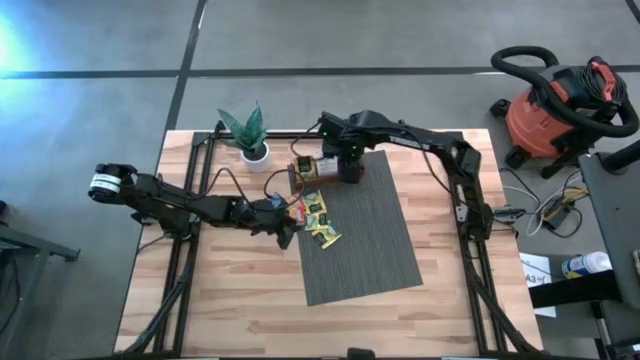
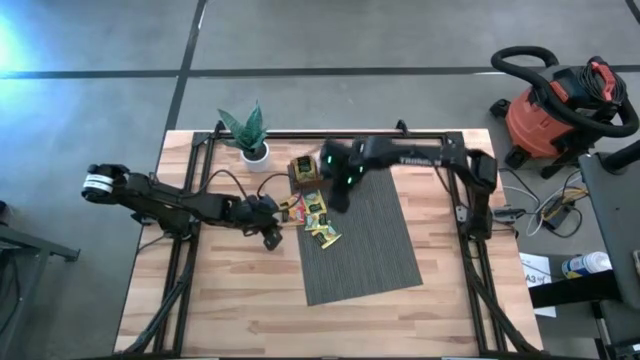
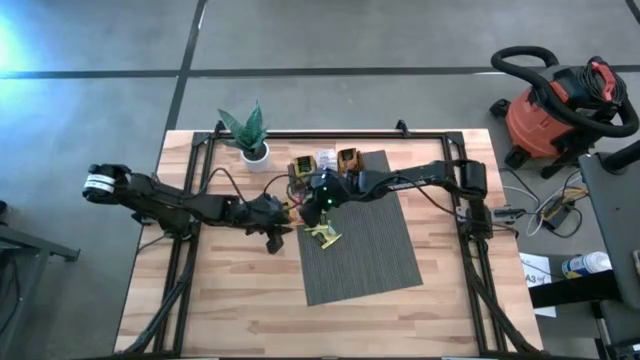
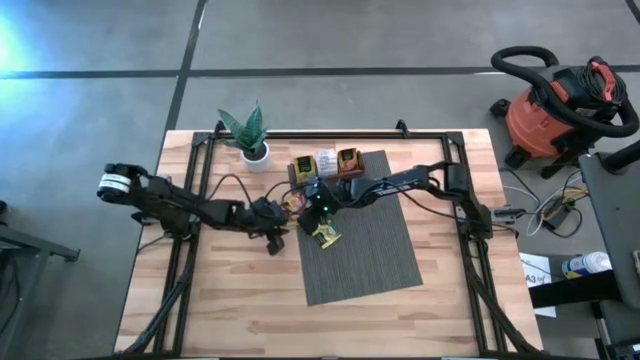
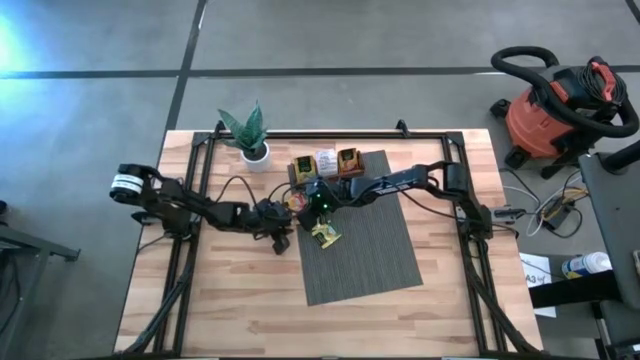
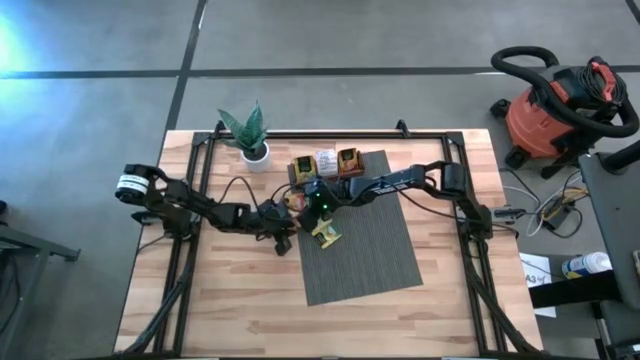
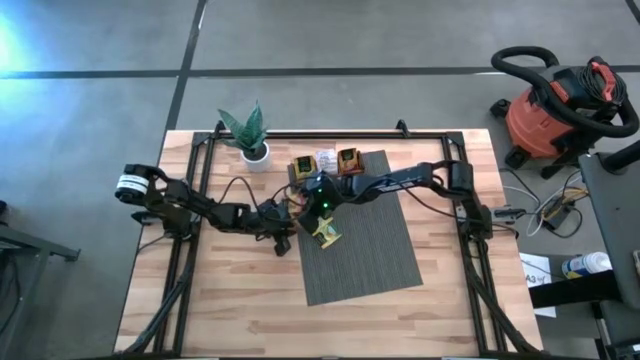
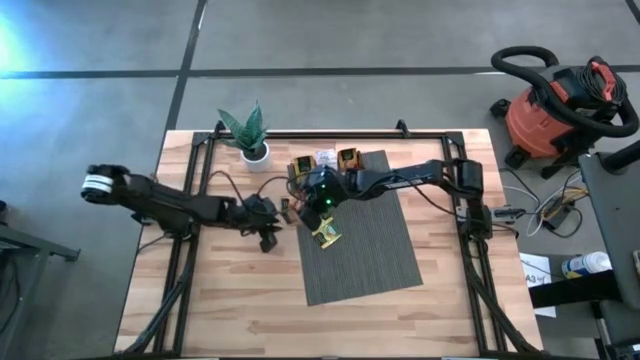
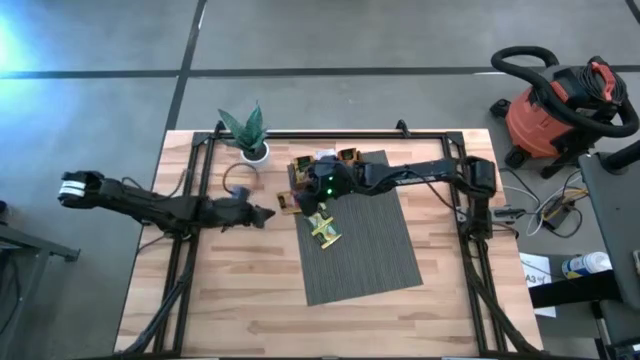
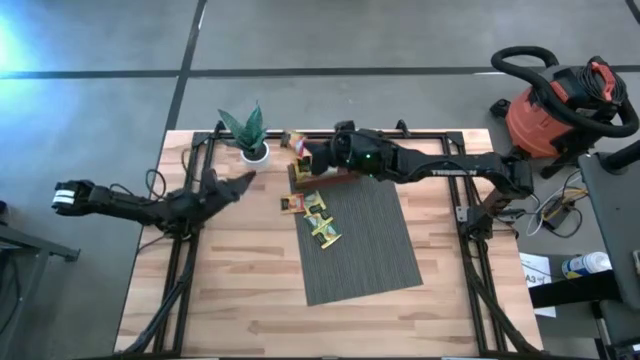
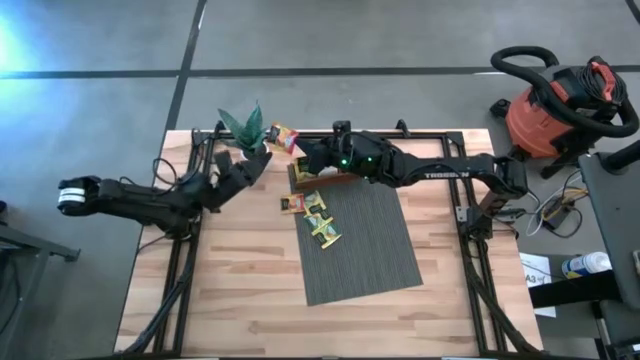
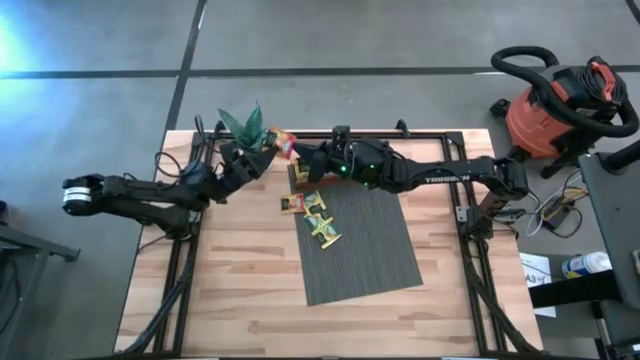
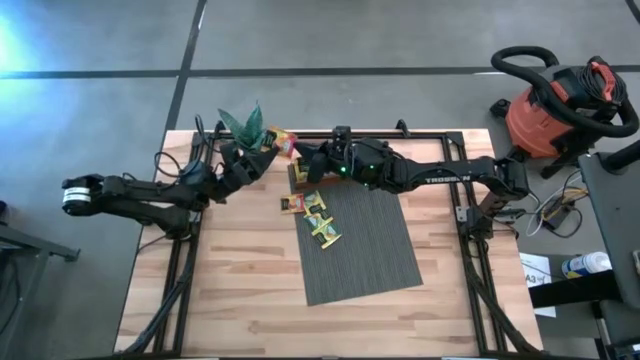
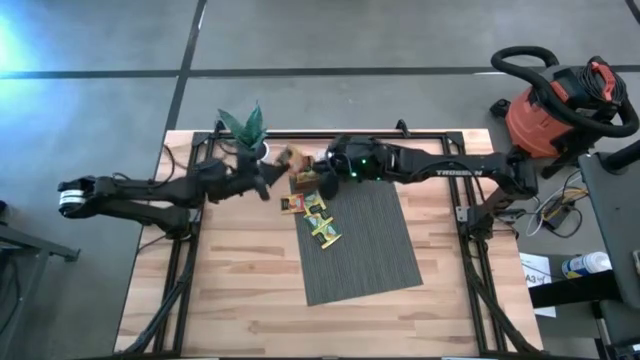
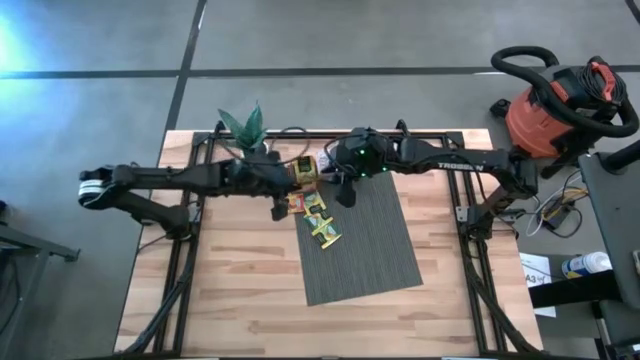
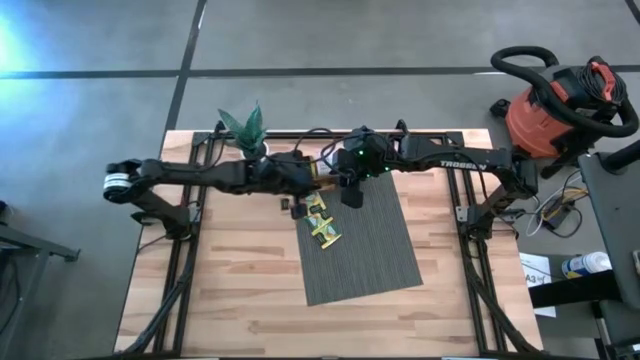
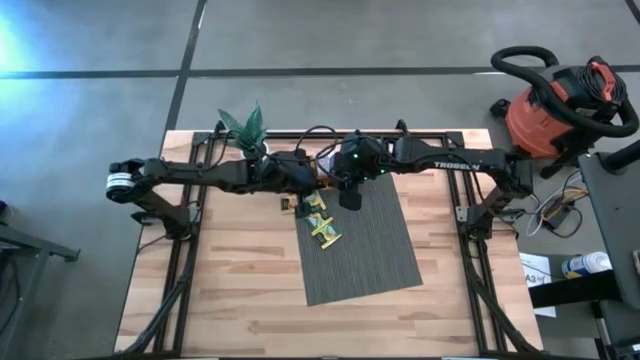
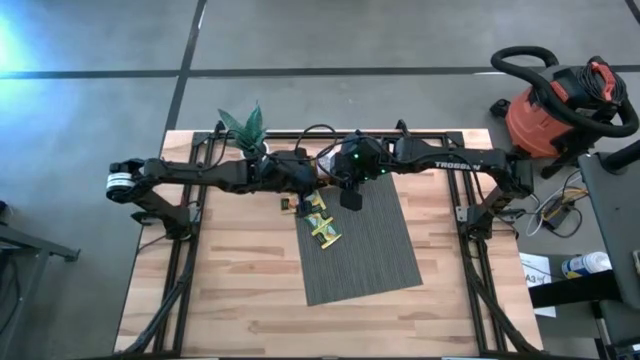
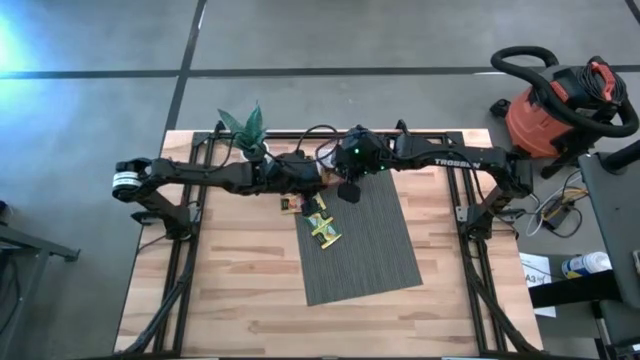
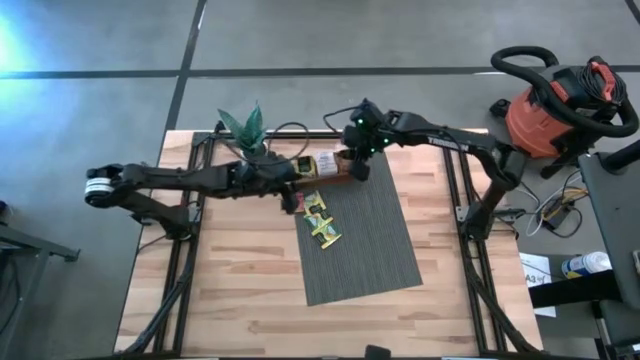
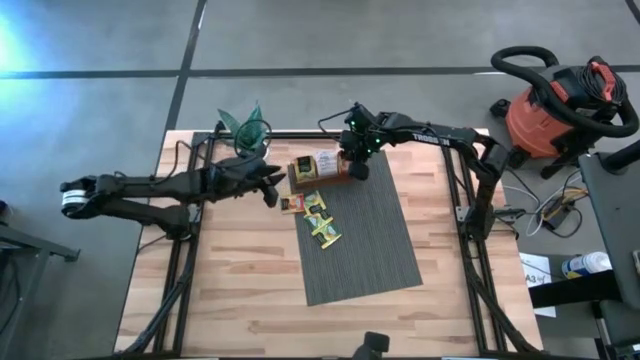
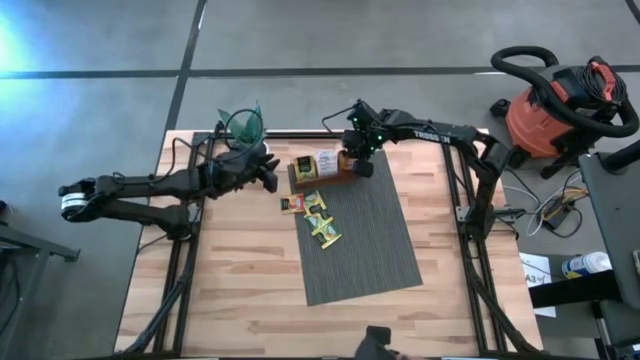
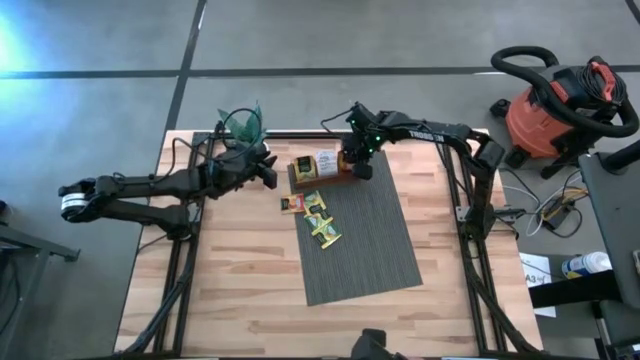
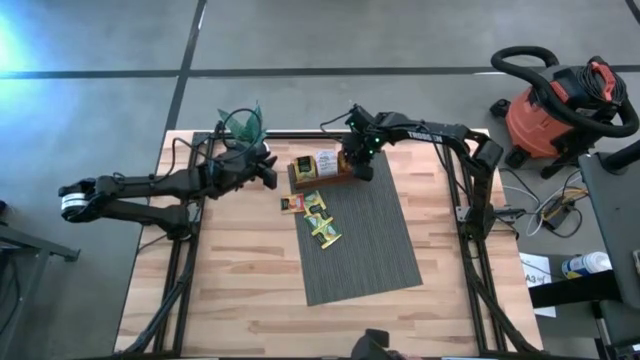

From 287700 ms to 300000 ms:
Task: Pick & Place Tea
Put the bottom orange tea bag into the right compartment of the wooden organizer

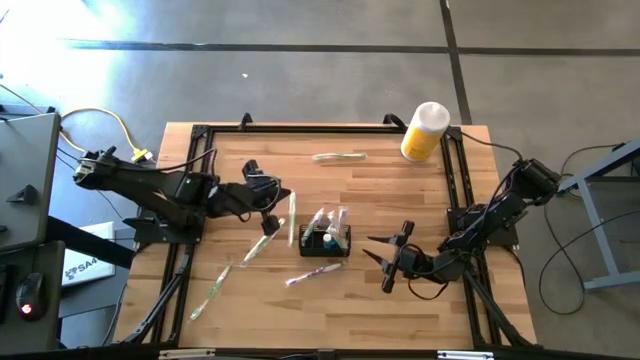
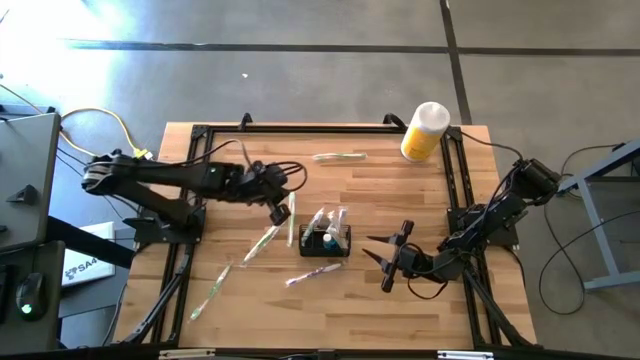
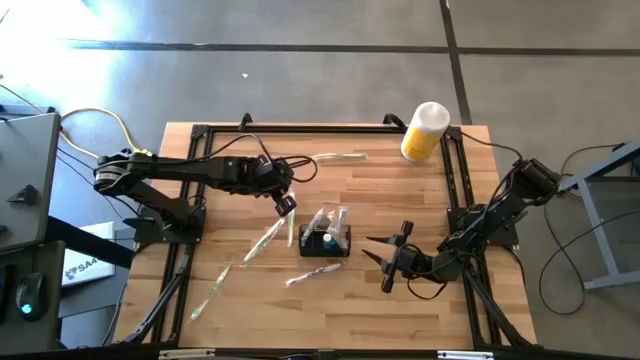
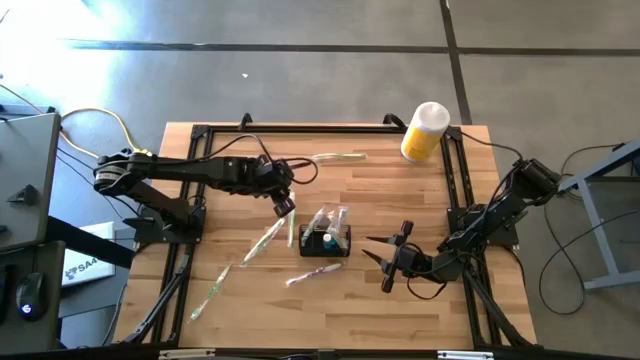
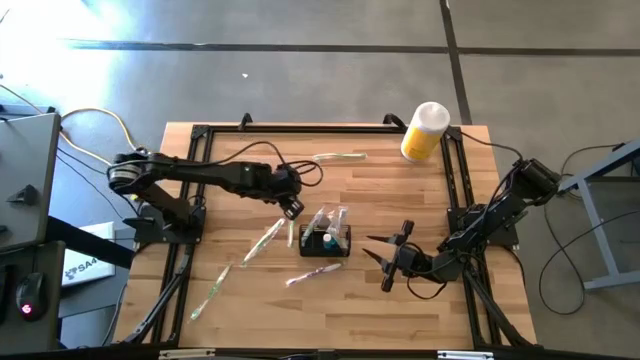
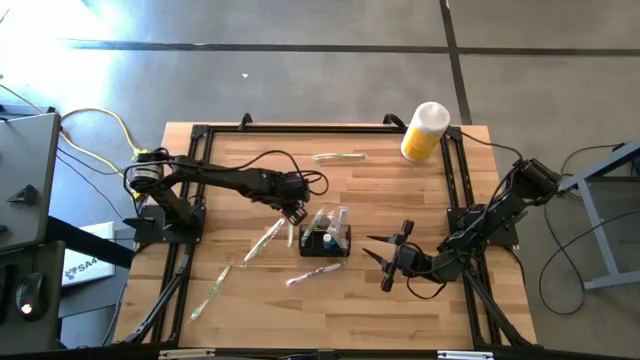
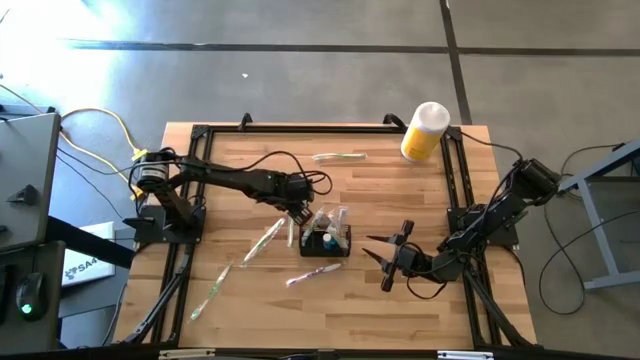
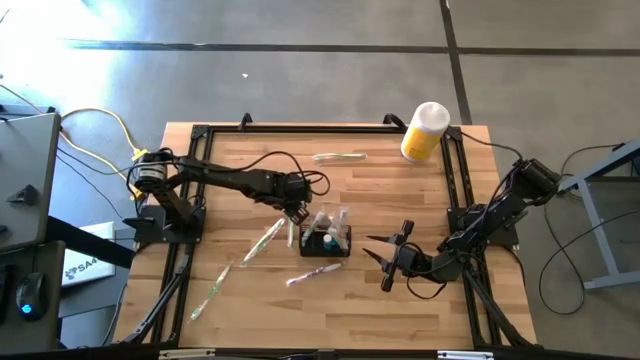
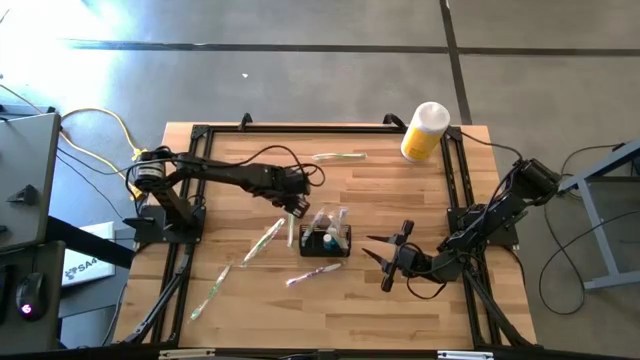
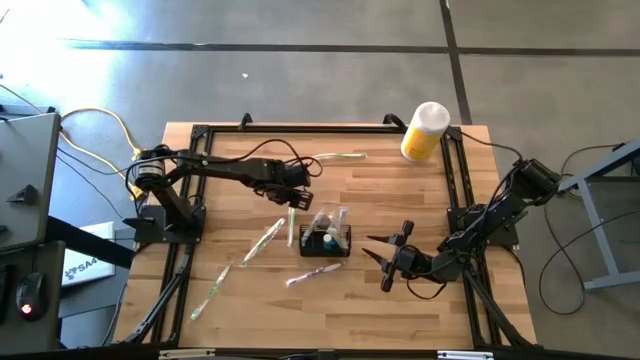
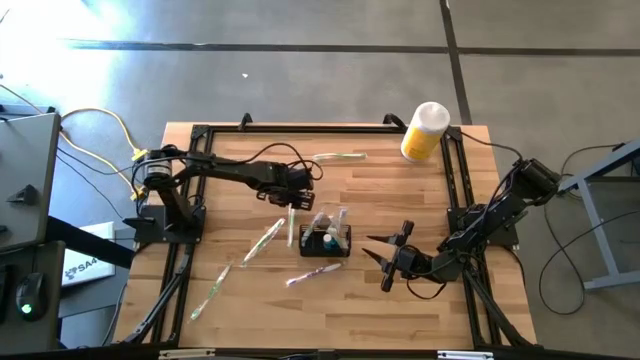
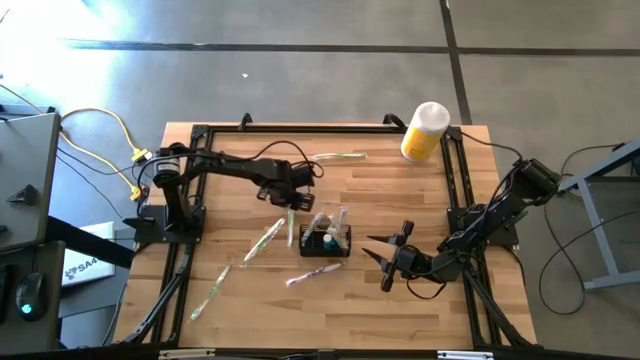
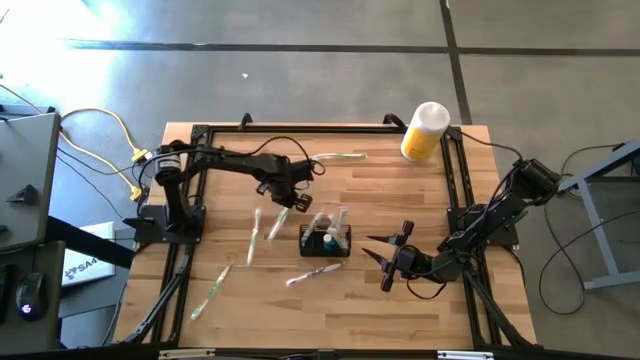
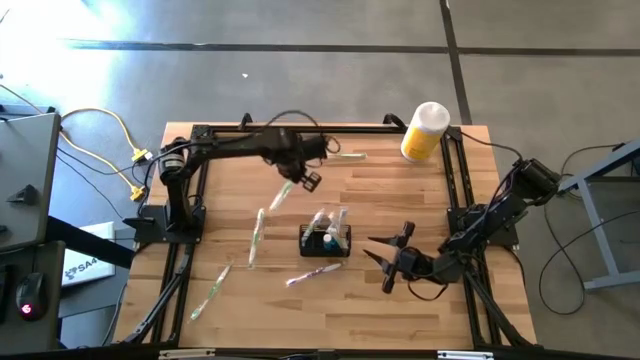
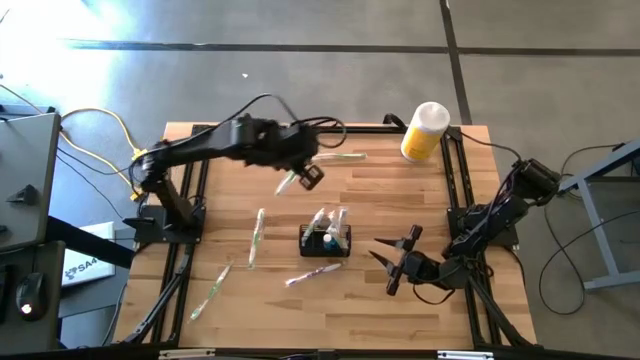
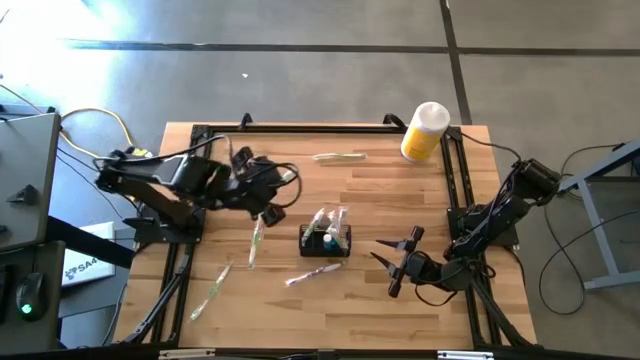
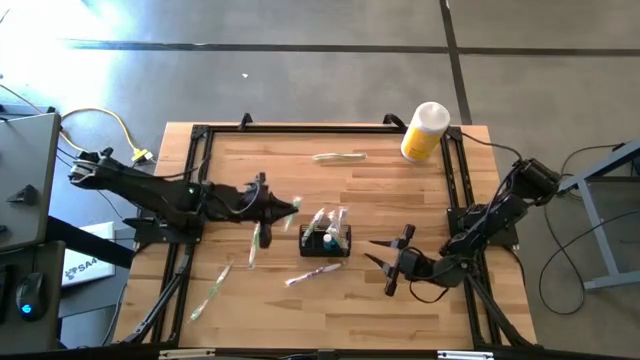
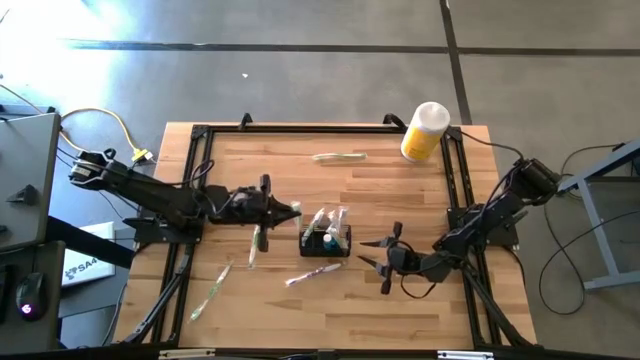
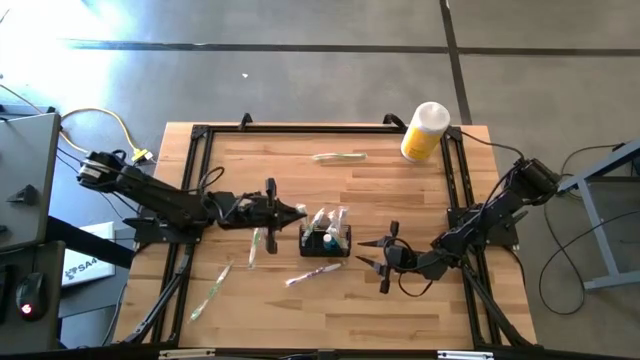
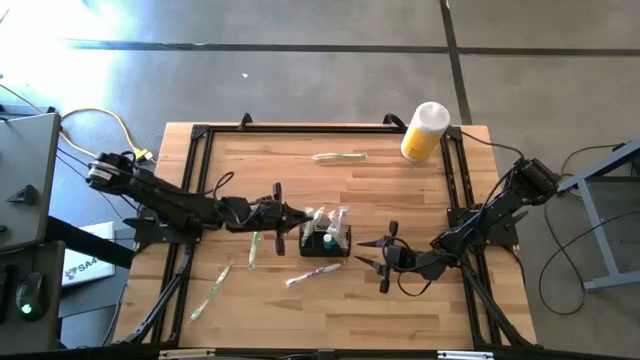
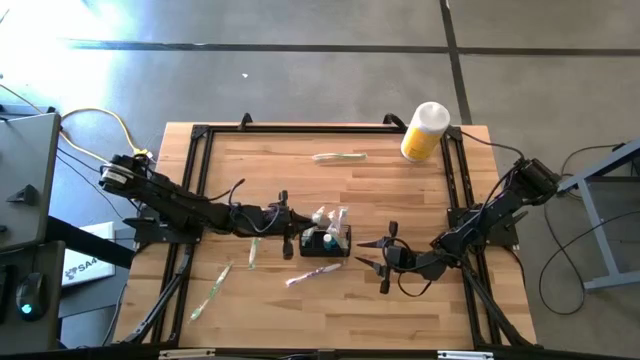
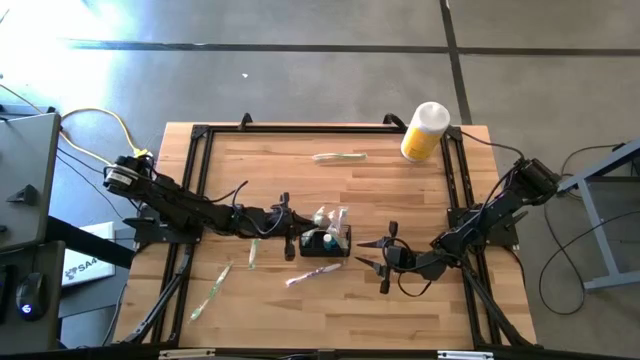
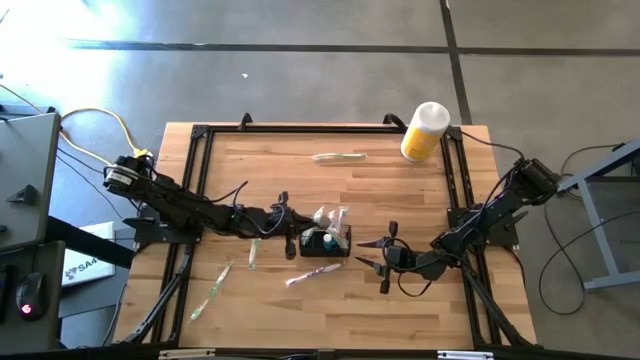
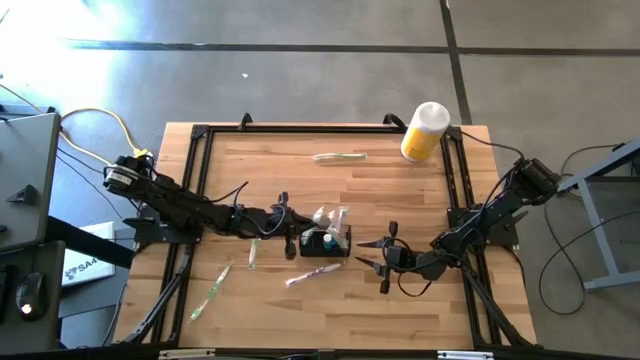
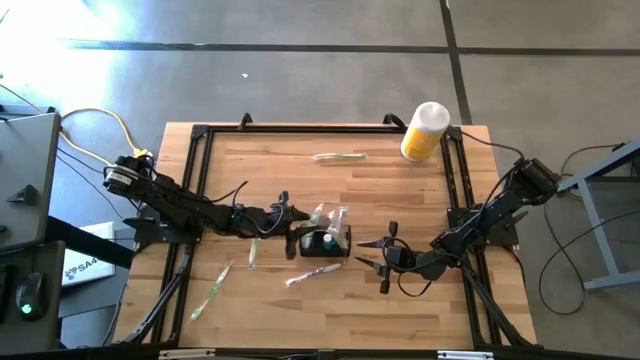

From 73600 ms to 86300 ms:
Task: Pick & Place toothbrushing station
Put the green toothbrush into the black wire organizer
